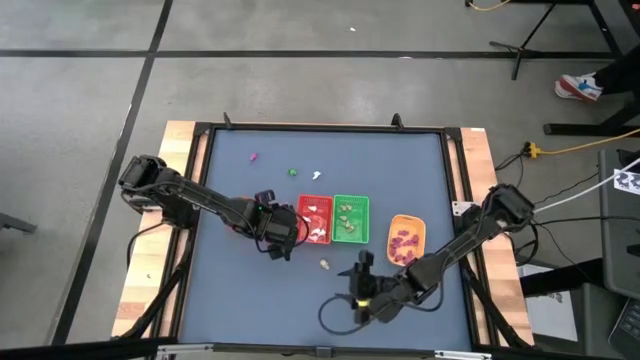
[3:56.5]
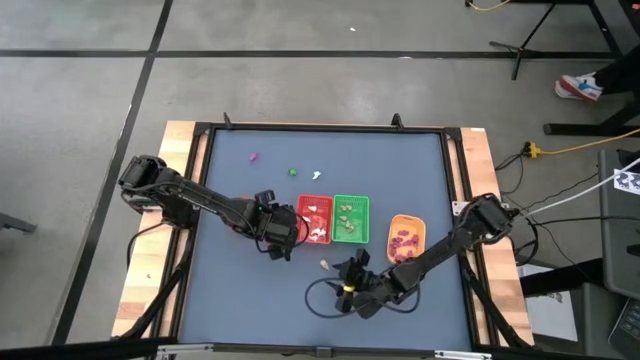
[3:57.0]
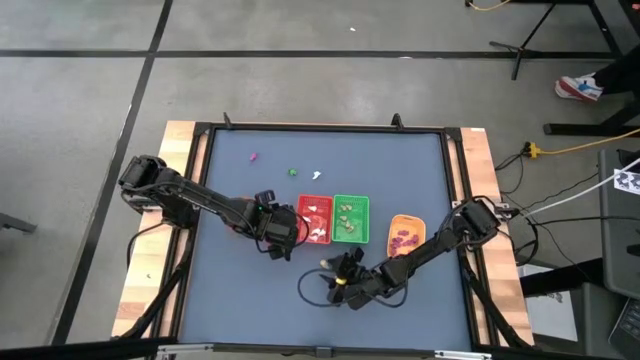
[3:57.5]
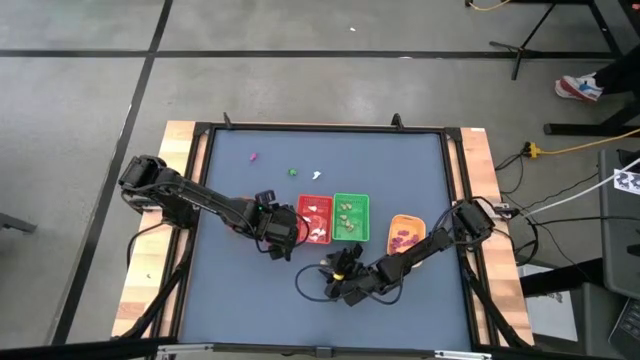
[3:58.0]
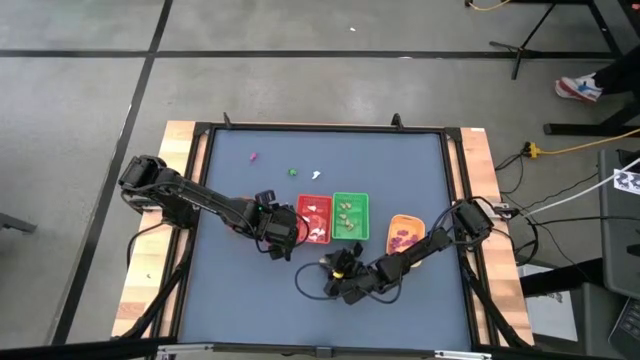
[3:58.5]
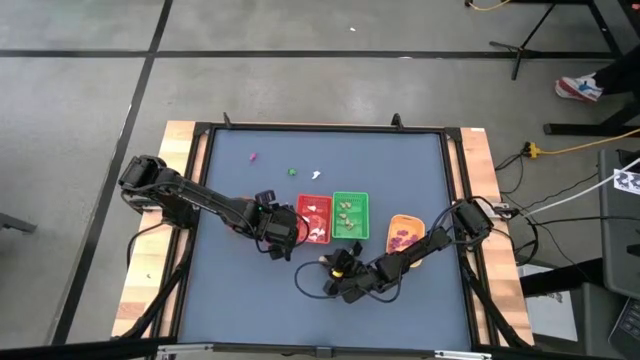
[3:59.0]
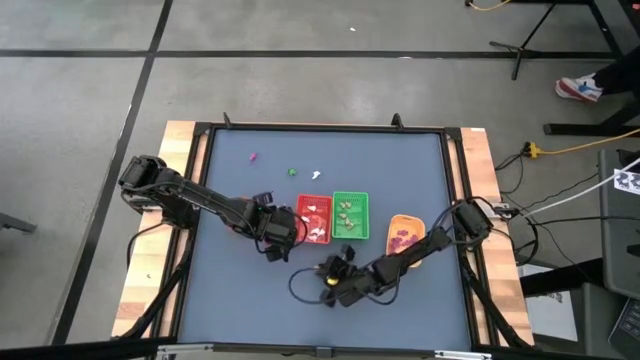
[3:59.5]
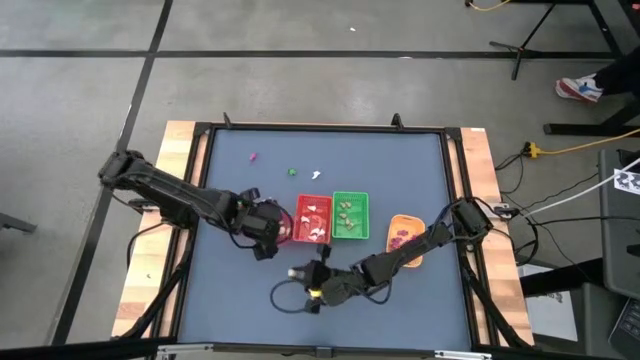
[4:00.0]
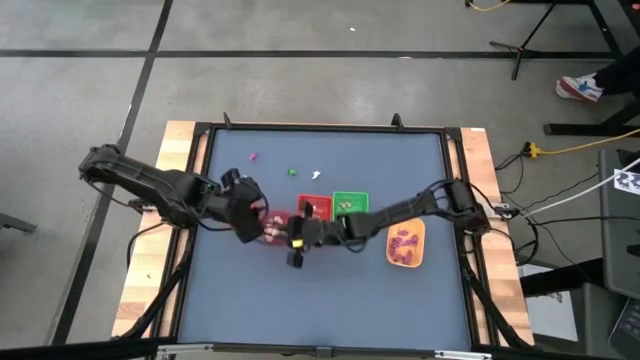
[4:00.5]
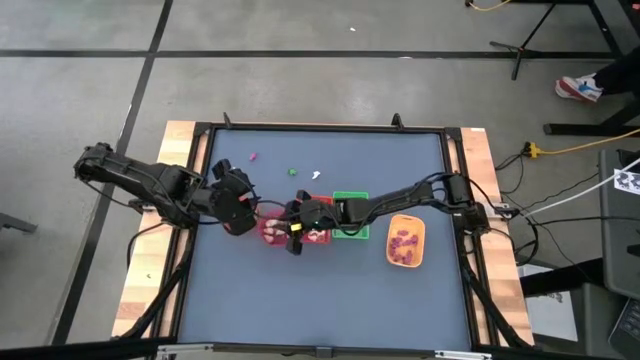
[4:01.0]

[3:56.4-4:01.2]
Task: Sort Halloween decoration
Put the yellow skull toy into the pink bowl

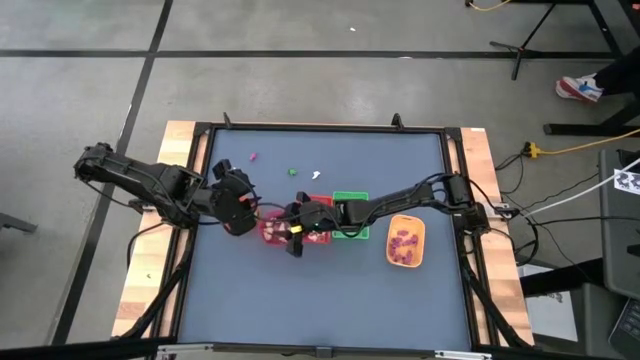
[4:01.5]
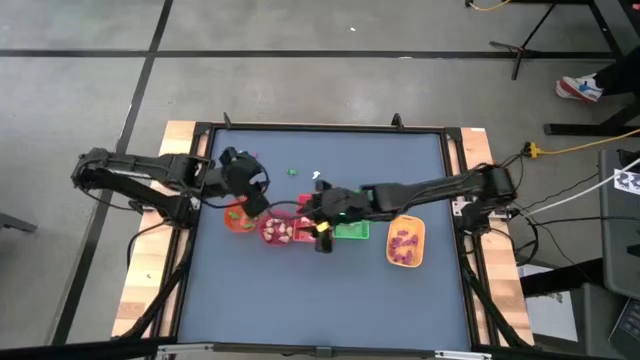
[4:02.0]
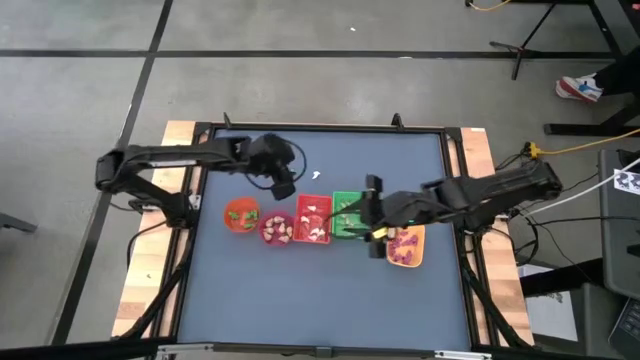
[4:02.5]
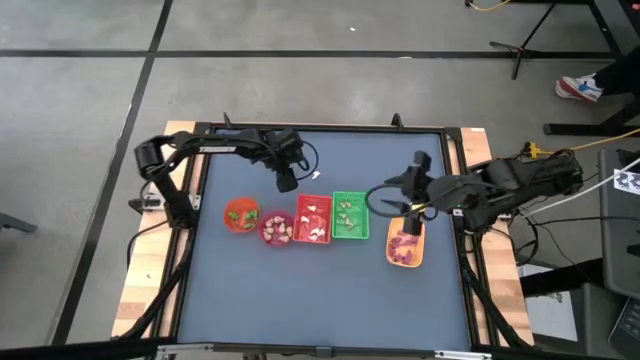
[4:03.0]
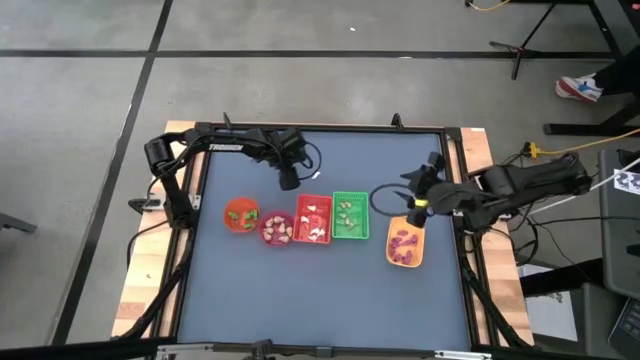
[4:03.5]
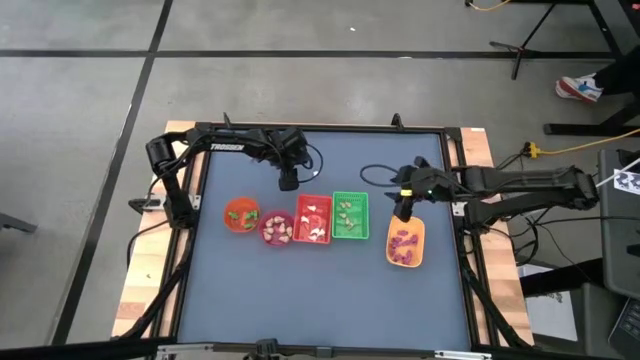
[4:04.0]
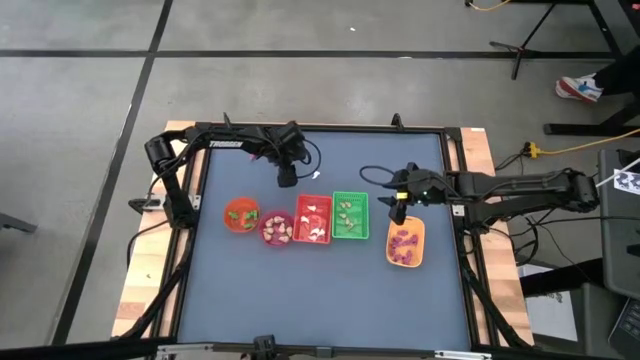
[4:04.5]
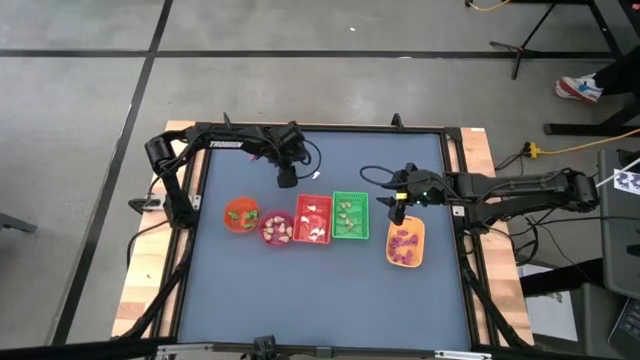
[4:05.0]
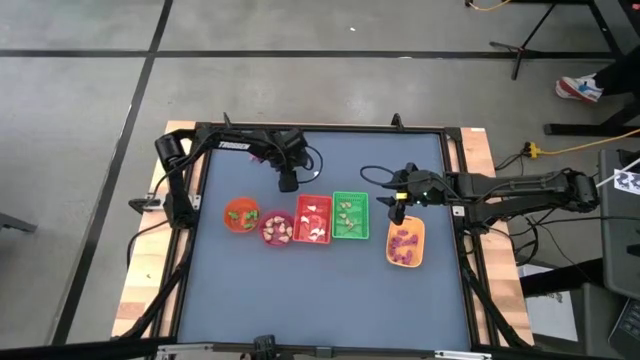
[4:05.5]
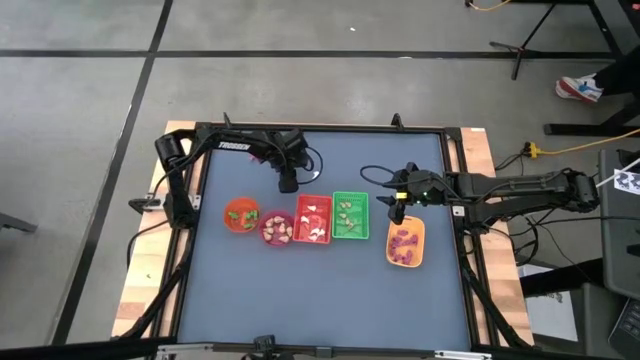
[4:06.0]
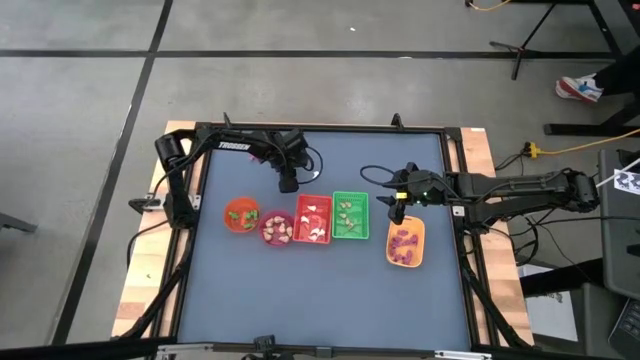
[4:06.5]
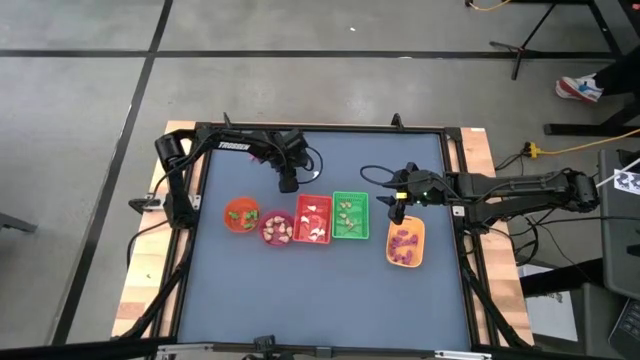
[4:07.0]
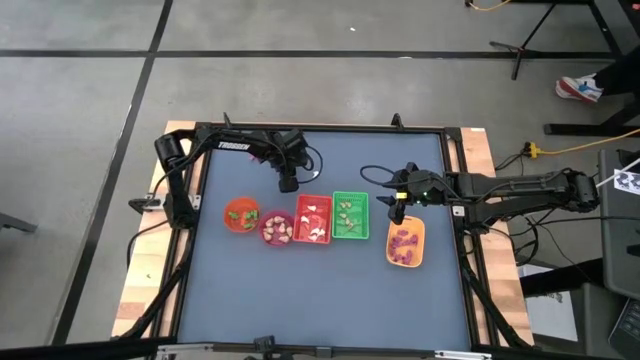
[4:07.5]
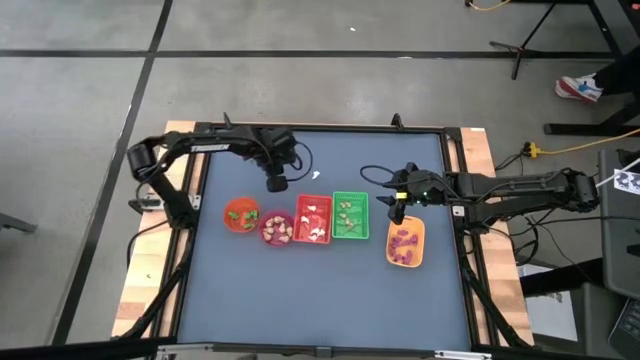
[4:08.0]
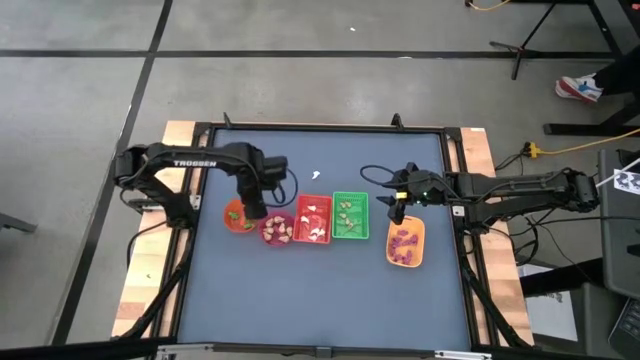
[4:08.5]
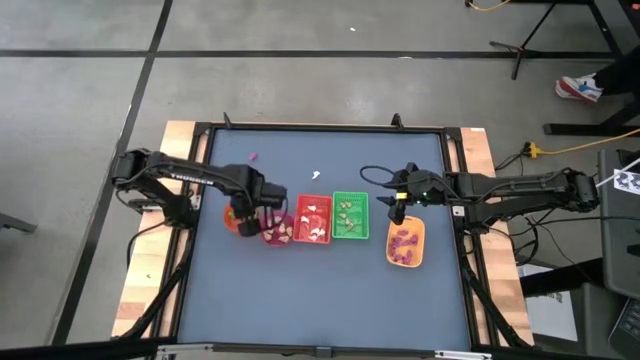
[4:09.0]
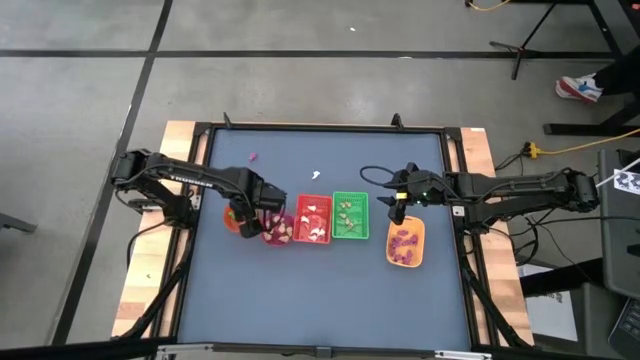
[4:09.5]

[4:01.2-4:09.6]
Put the green skeleton toy into the orange bowl

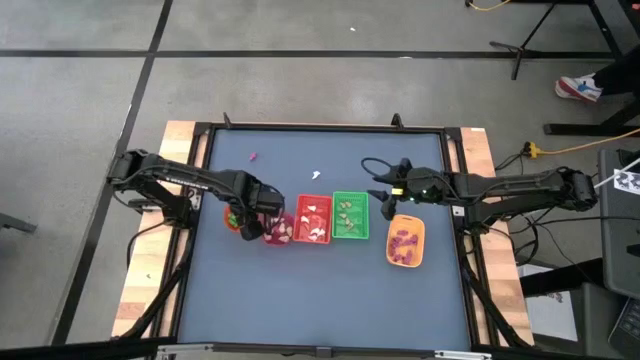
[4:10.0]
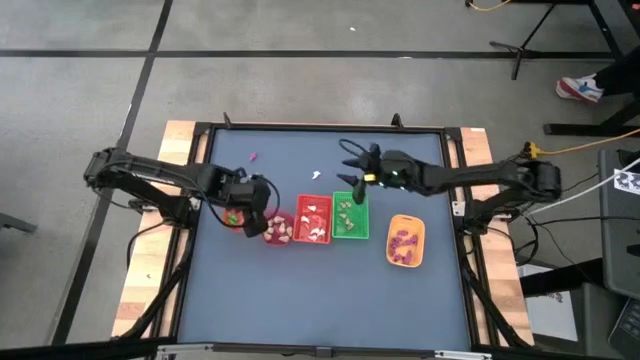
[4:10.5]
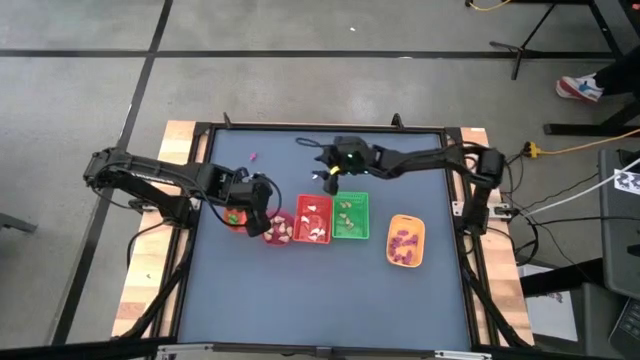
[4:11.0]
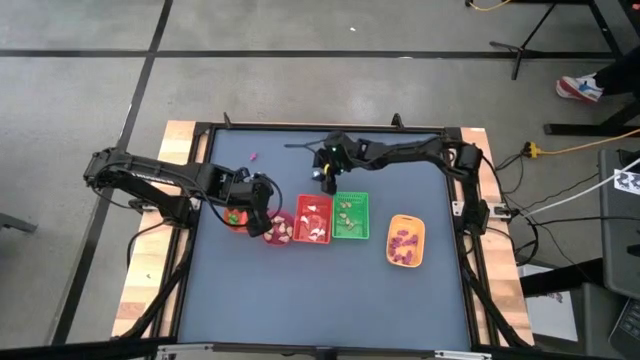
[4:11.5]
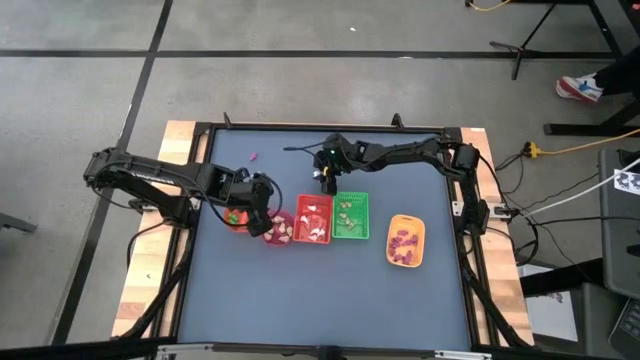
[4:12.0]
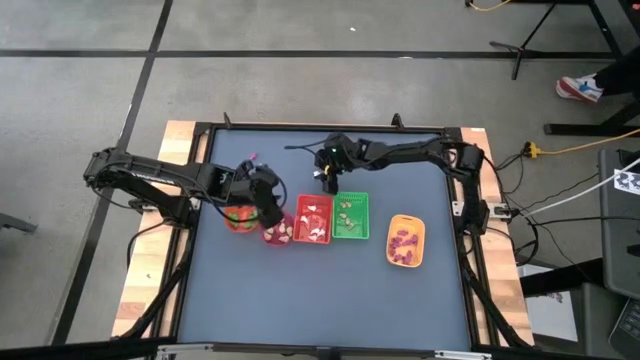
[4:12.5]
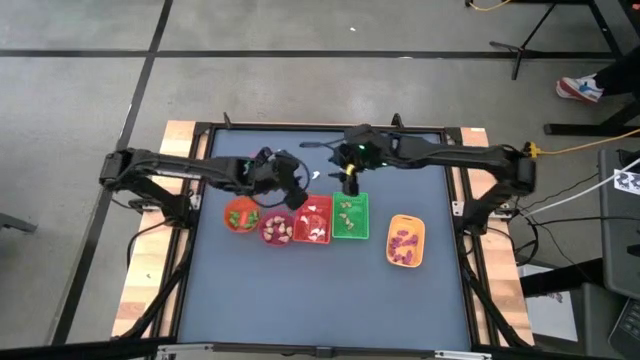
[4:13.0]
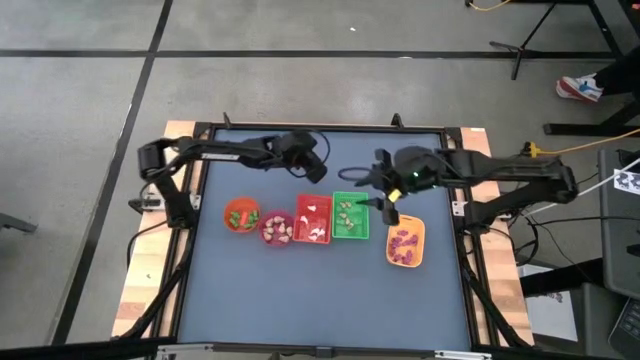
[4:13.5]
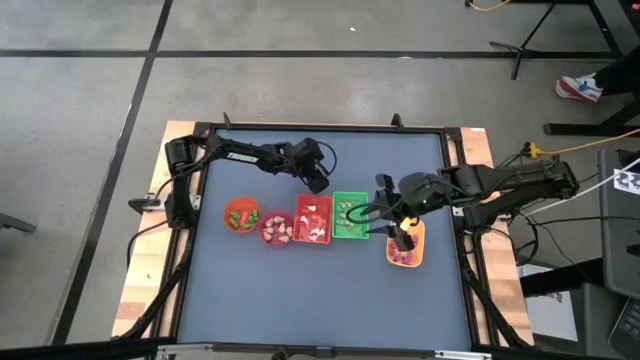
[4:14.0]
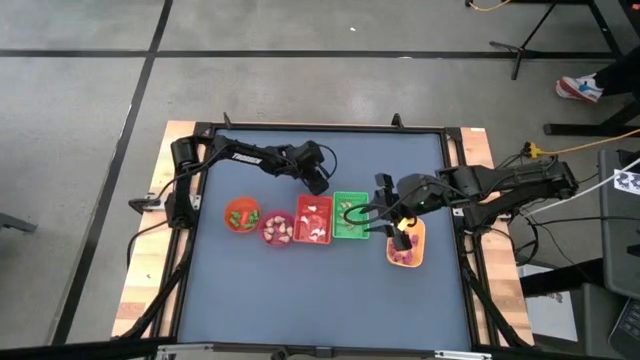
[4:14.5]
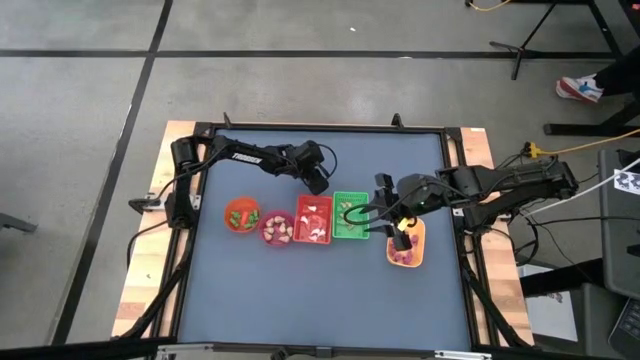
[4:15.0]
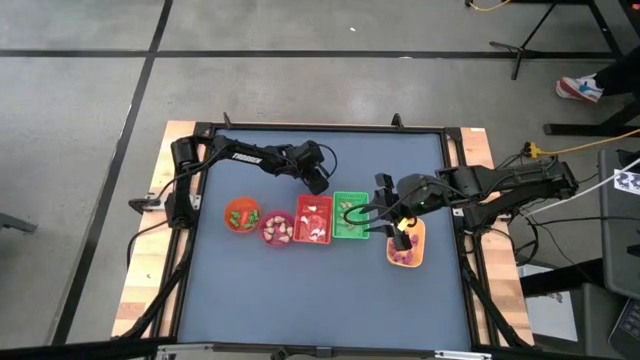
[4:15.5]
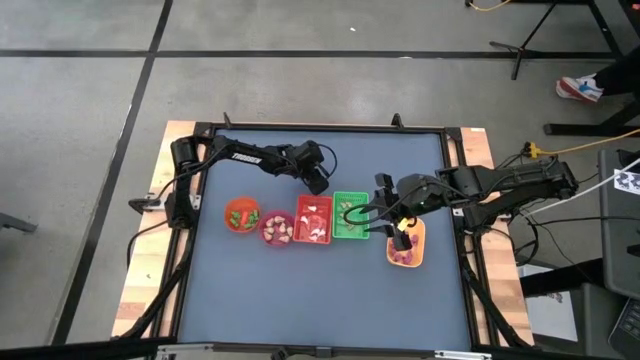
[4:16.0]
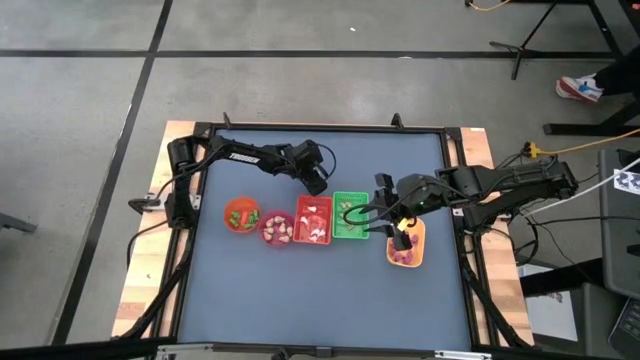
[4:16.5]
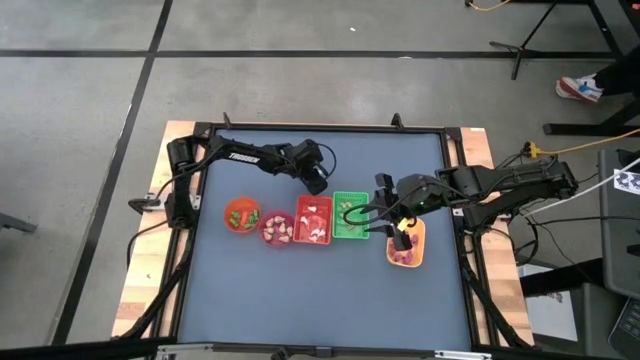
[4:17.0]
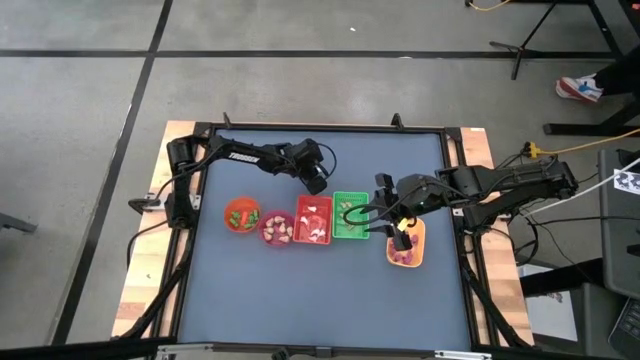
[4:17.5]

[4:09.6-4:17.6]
Put the white ghost toy into the red bin
